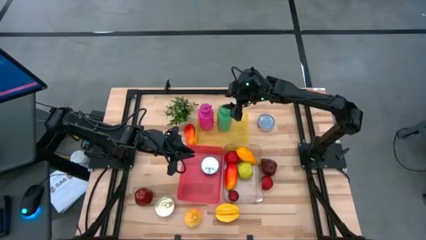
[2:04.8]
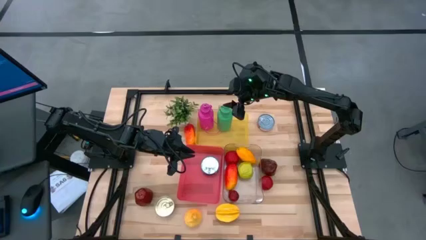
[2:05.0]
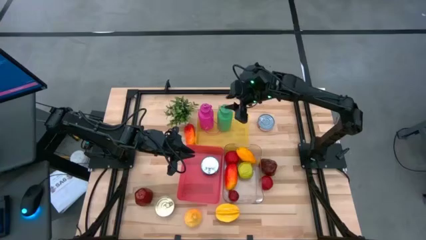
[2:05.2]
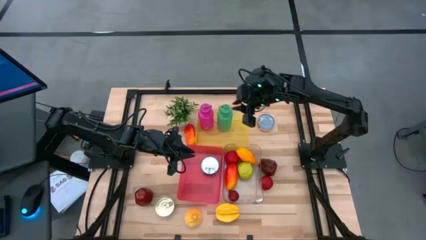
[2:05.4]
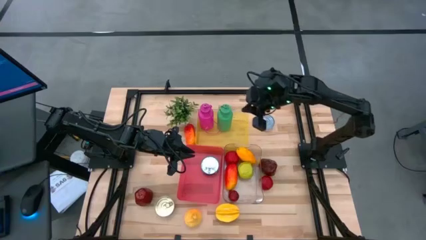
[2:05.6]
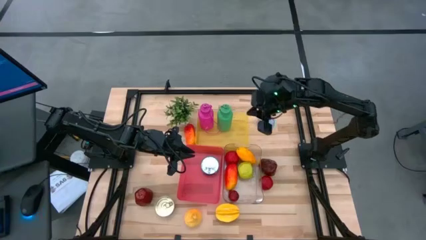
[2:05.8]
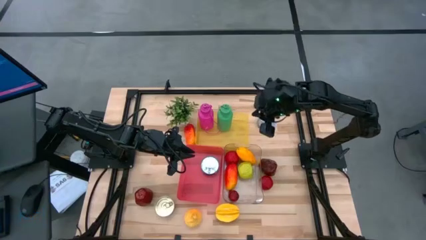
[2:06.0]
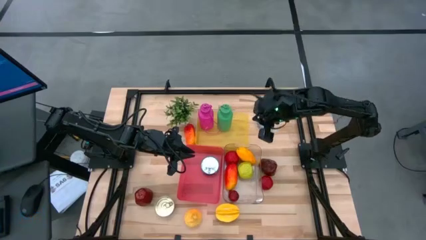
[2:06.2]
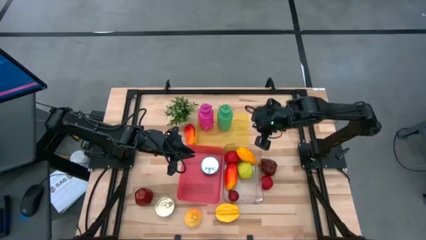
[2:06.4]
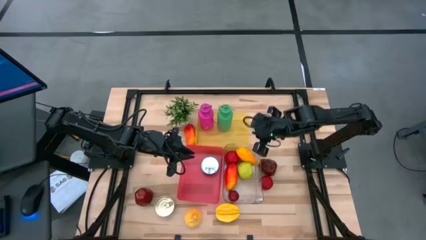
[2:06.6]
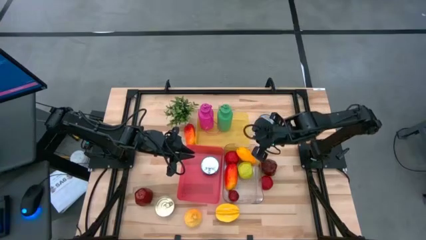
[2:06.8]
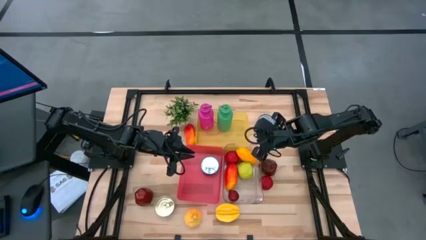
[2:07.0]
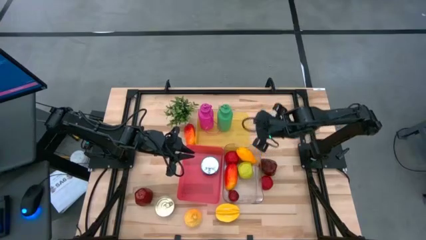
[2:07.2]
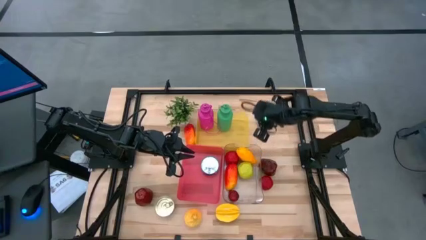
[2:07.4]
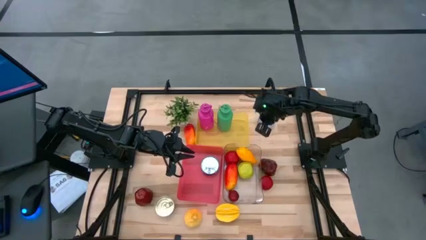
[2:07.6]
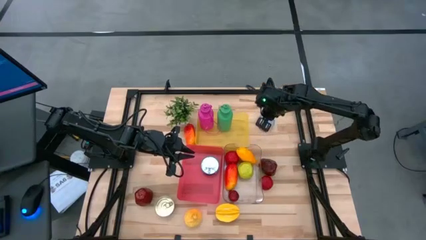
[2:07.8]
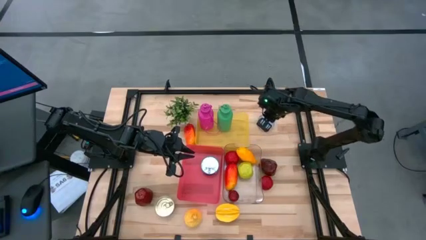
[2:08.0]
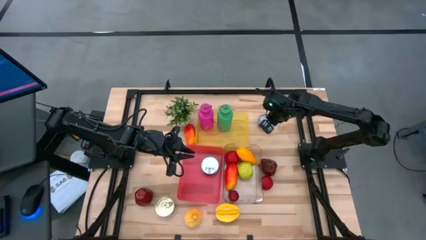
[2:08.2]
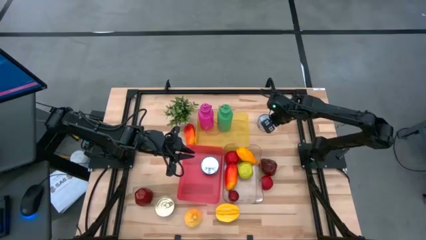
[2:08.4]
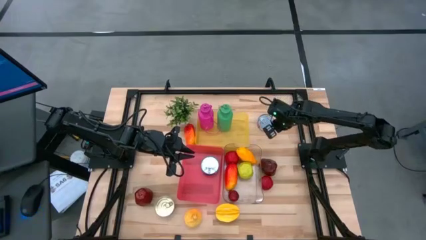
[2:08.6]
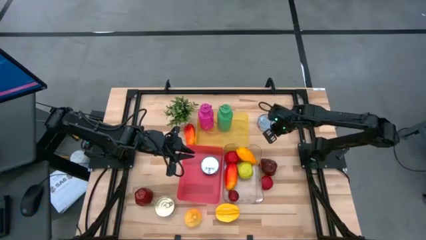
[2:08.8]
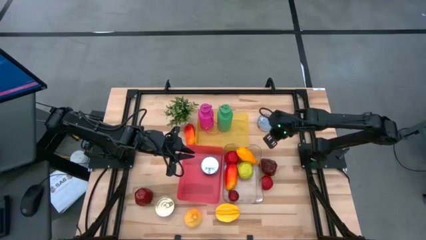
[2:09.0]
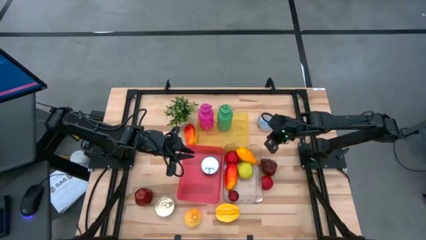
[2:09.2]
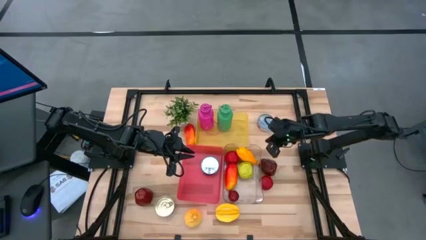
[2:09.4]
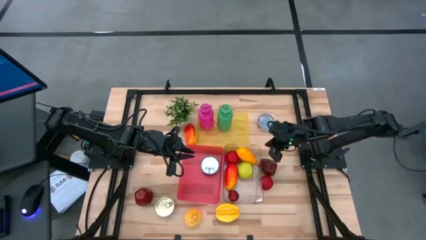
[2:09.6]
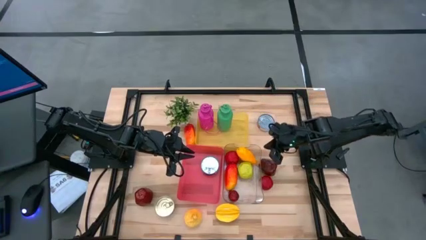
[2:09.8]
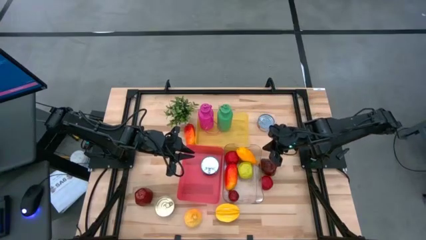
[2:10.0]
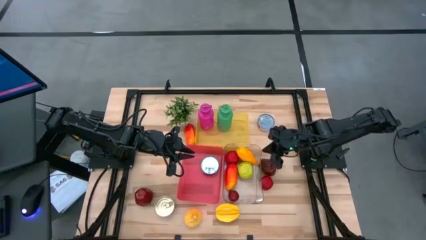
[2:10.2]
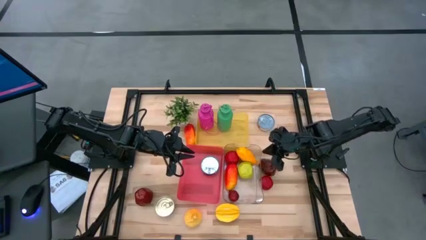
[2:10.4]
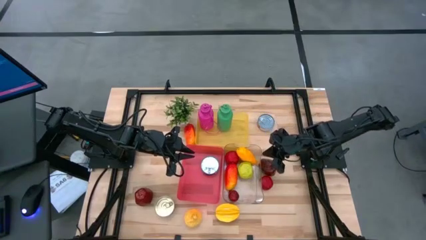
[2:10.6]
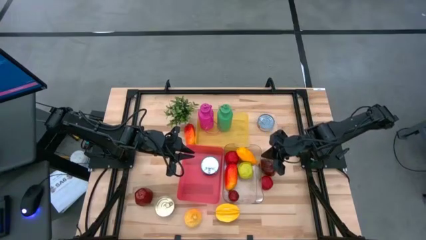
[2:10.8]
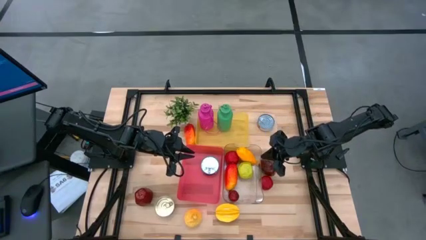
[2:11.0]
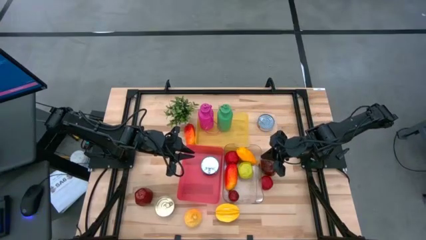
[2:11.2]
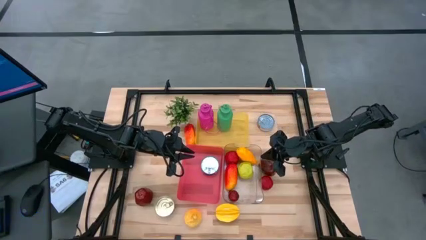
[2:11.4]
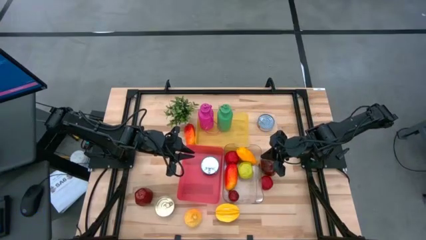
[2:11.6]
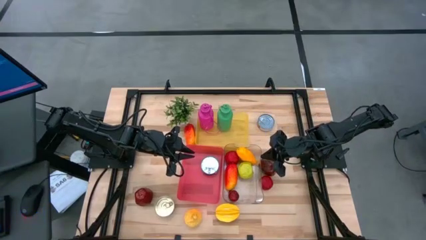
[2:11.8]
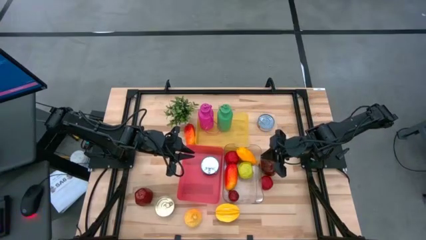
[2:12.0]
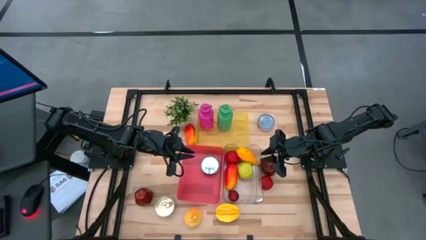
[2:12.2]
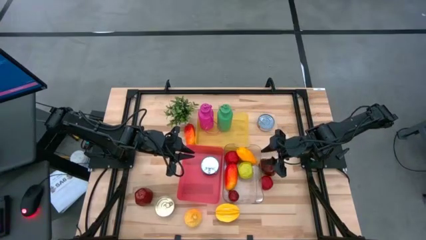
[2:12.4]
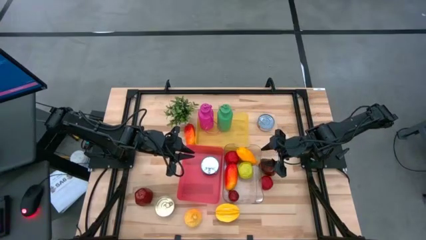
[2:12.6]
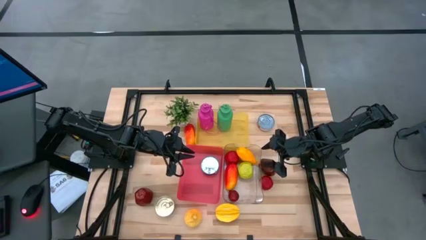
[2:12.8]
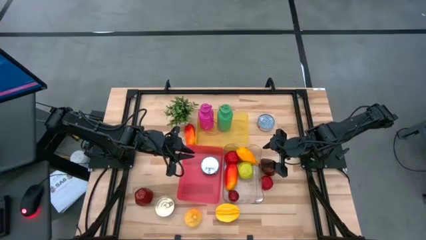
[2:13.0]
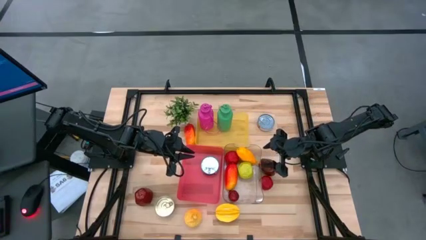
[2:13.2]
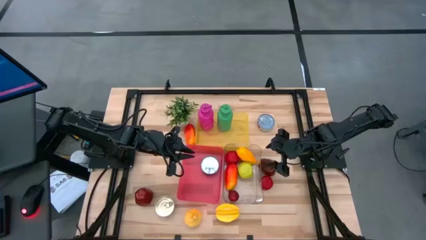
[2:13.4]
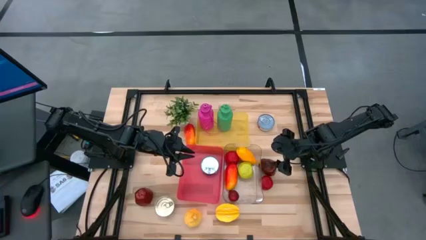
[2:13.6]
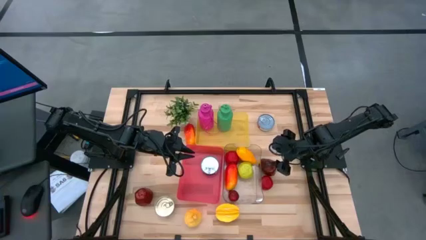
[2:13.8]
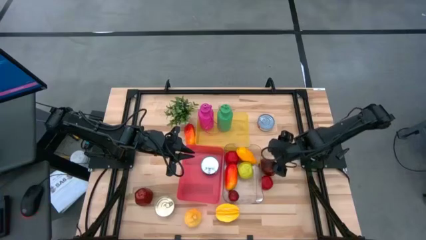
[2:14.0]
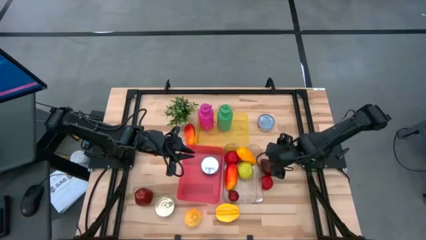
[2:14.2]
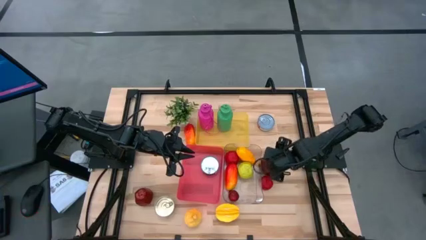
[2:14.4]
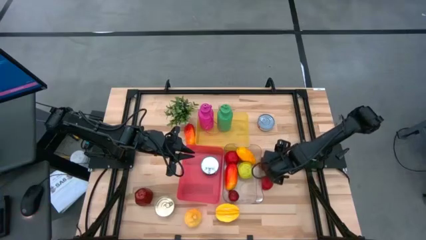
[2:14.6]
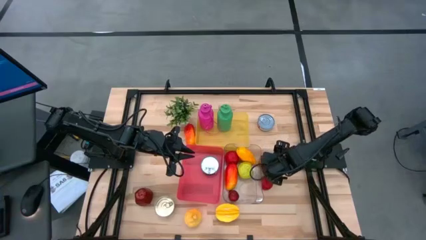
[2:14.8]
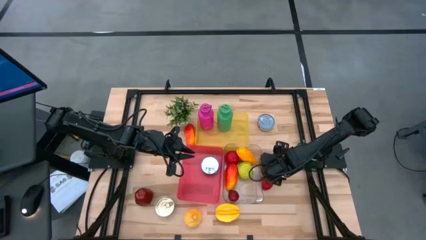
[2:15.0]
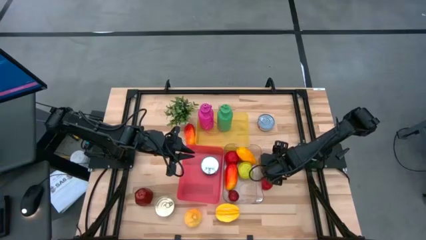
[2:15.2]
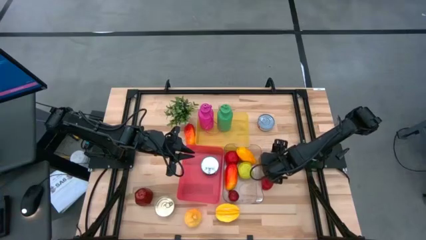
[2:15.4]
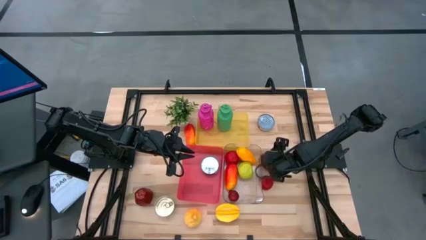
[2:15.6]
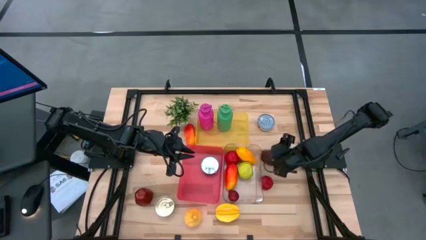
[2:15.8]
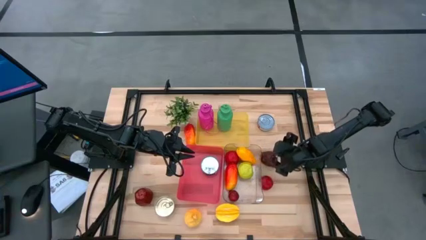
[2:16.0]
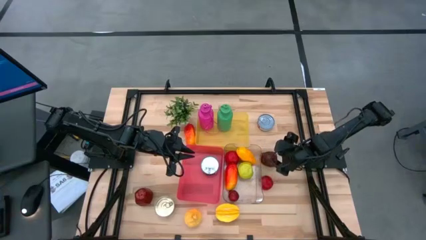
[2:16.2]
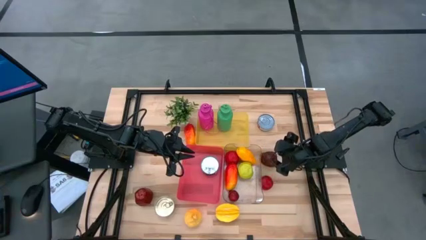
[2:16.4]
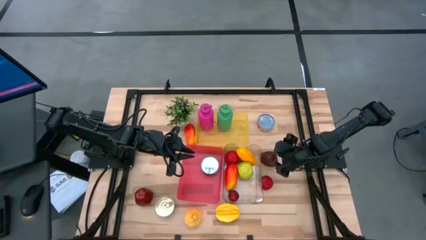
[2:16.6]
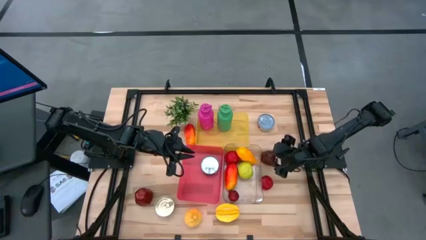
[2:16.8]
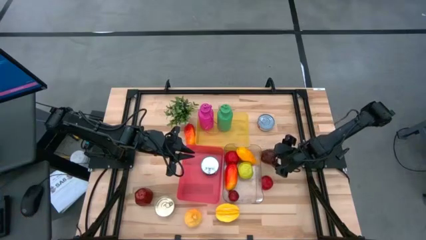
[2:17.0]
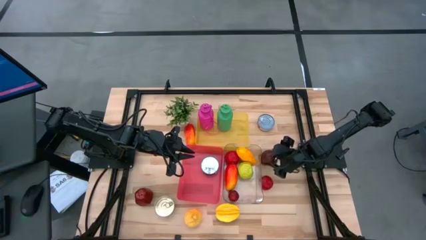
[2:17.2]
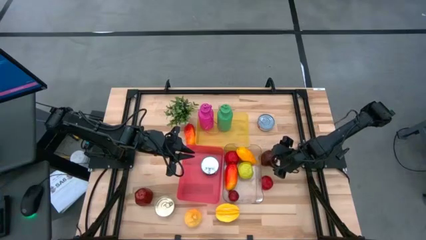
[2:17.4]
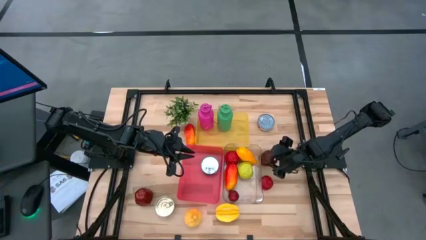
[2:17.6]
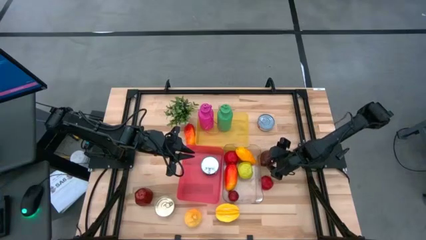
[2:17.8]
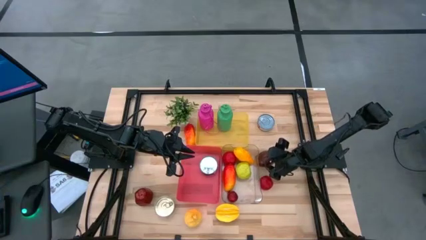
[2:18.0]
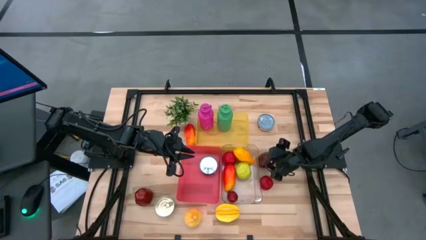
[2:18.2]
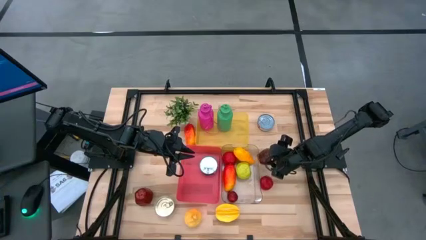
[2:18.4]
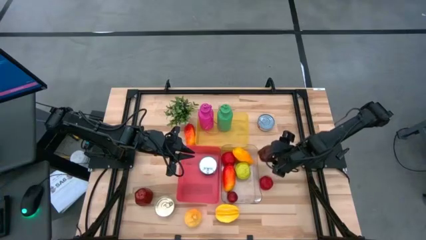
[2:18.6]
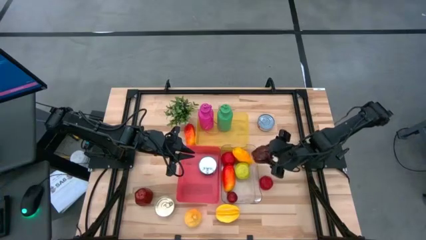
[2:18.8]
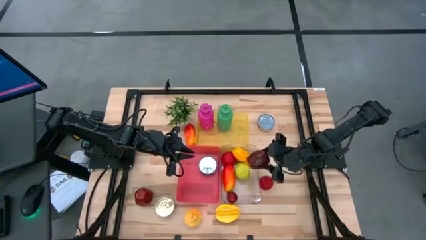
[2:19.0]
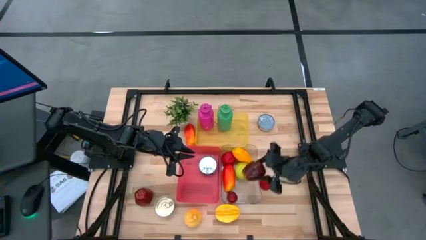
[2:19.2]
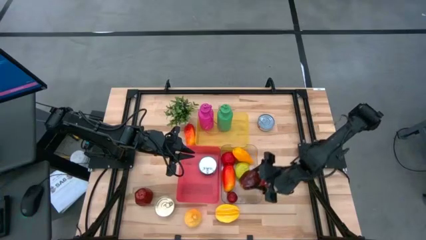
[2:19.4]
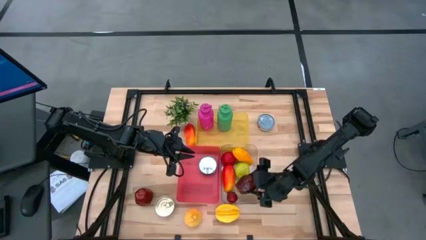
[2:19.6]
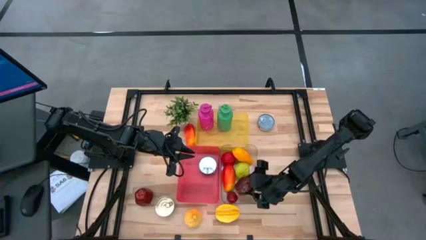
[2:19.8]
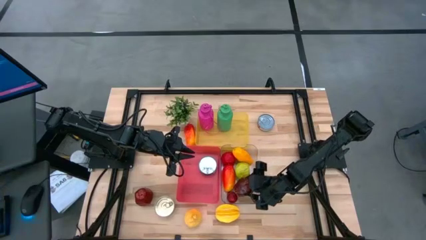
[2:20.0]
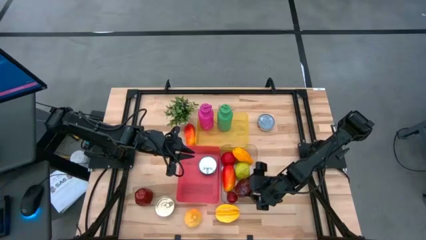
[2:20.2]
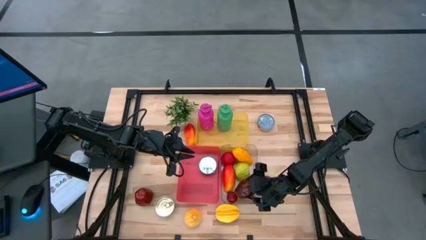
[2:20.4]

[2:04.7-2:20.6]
Task: Pick & Place Food Item
Put the right dark red apple into the transparent bin
